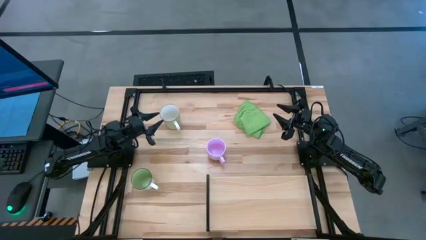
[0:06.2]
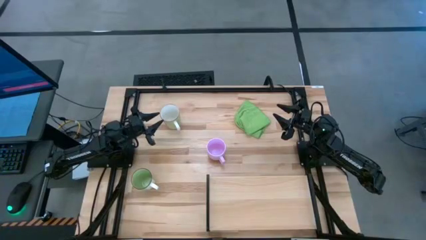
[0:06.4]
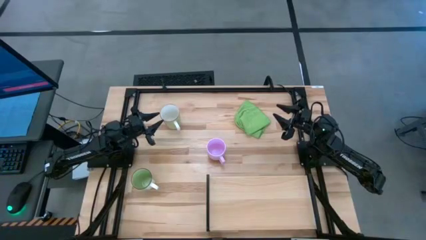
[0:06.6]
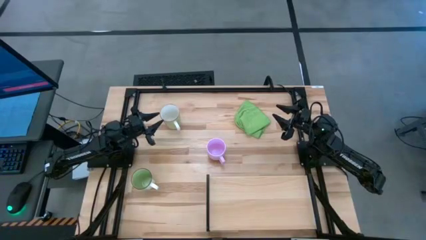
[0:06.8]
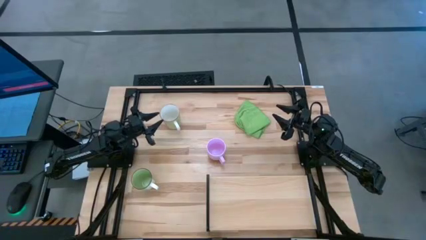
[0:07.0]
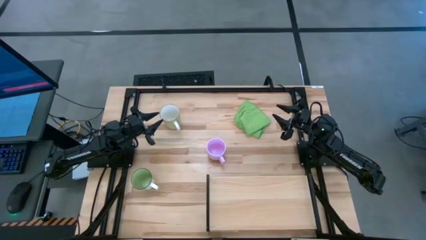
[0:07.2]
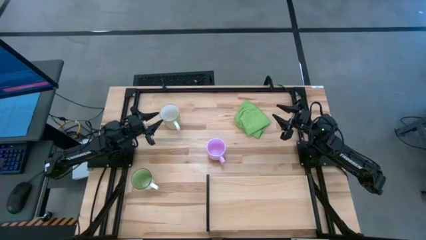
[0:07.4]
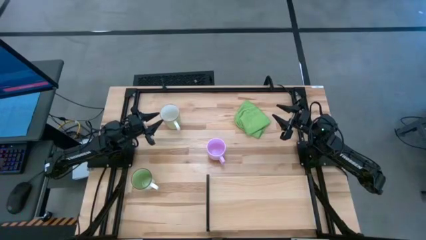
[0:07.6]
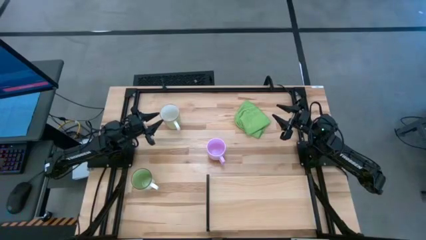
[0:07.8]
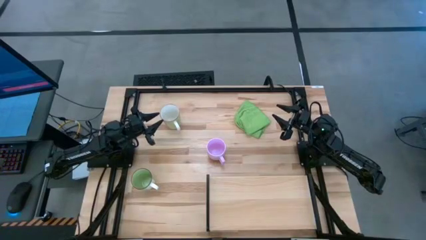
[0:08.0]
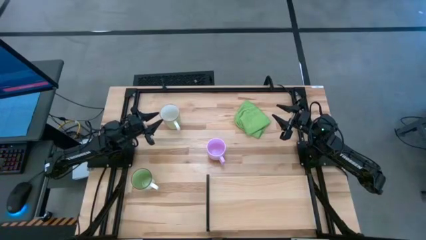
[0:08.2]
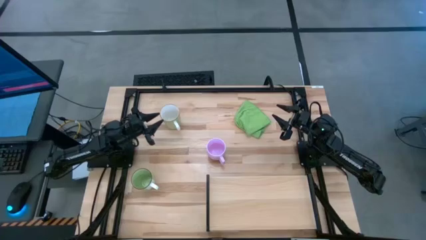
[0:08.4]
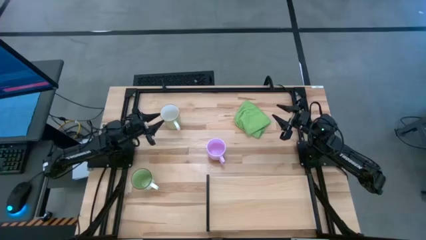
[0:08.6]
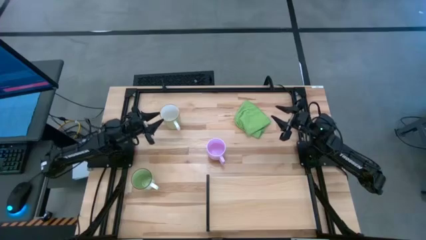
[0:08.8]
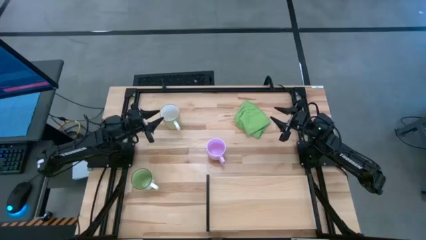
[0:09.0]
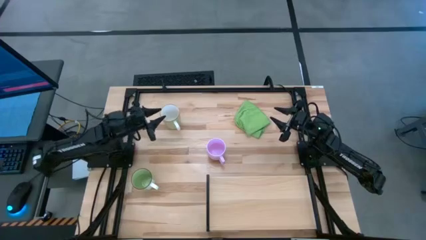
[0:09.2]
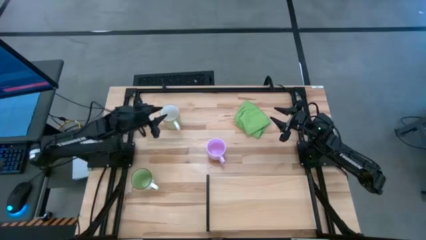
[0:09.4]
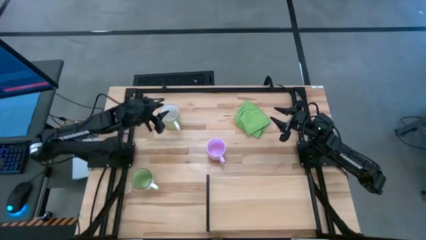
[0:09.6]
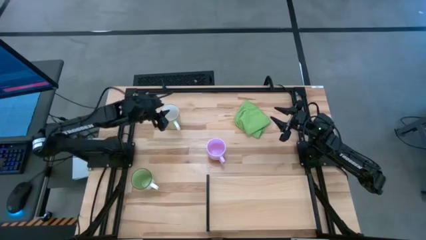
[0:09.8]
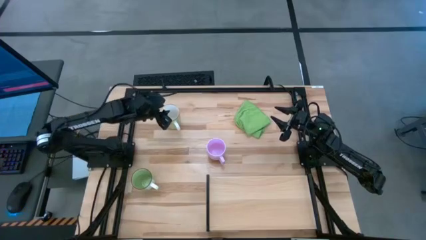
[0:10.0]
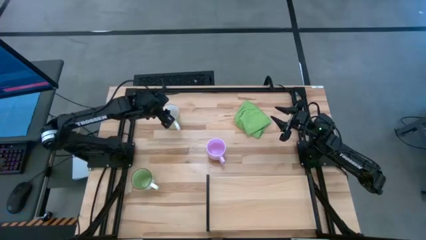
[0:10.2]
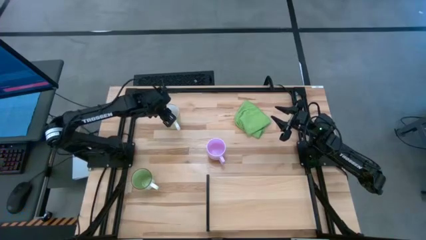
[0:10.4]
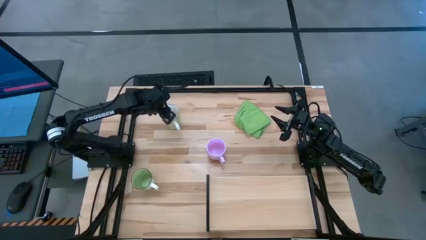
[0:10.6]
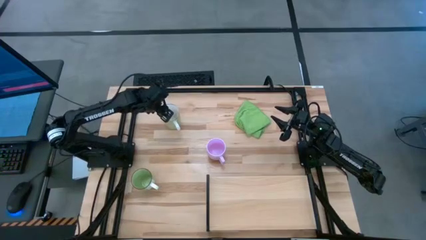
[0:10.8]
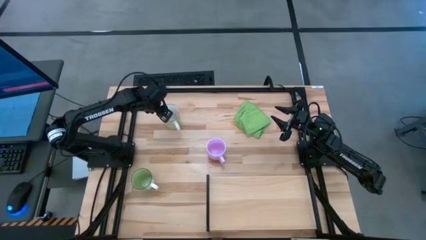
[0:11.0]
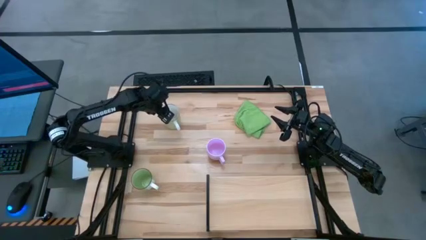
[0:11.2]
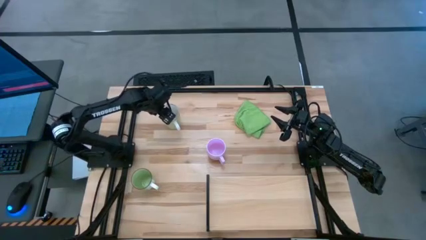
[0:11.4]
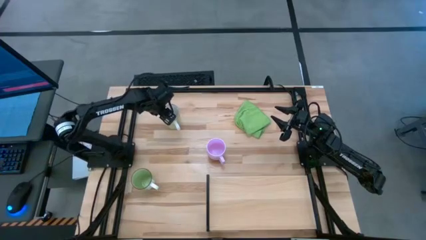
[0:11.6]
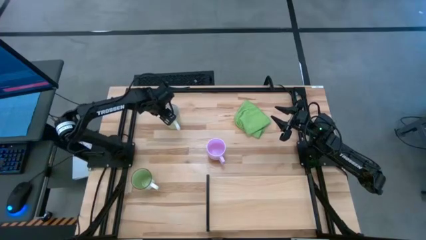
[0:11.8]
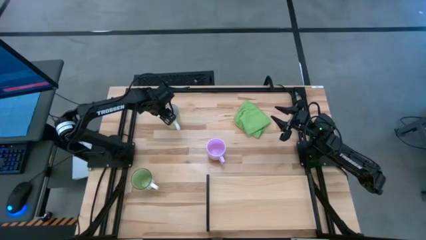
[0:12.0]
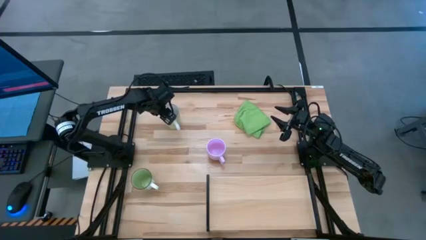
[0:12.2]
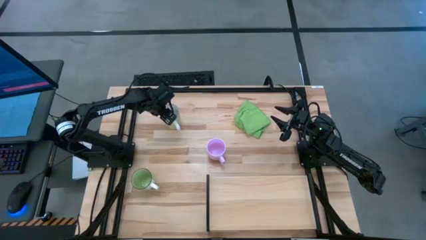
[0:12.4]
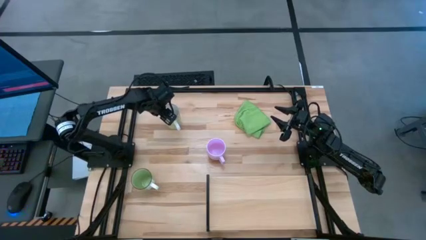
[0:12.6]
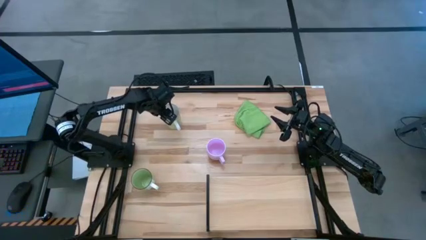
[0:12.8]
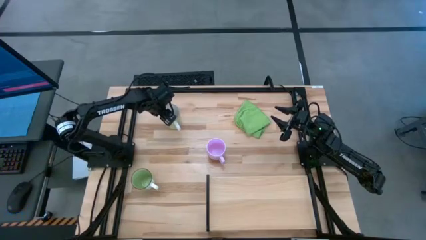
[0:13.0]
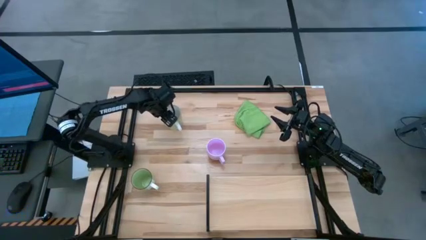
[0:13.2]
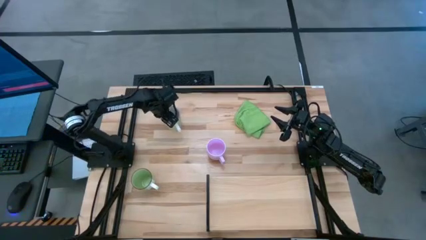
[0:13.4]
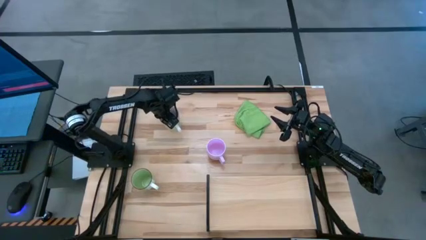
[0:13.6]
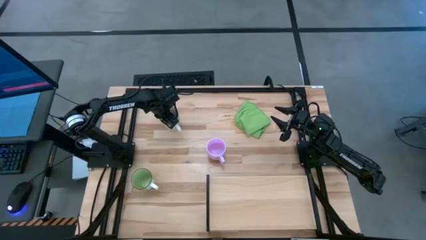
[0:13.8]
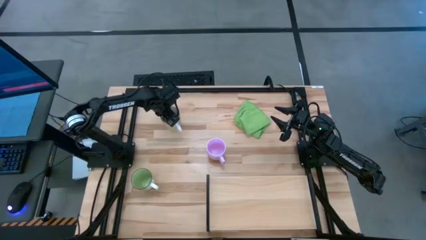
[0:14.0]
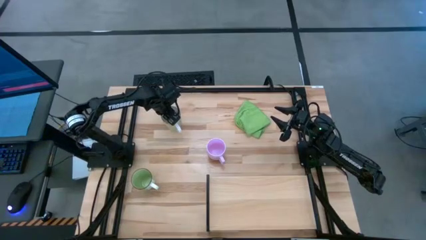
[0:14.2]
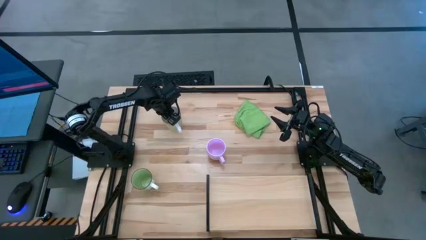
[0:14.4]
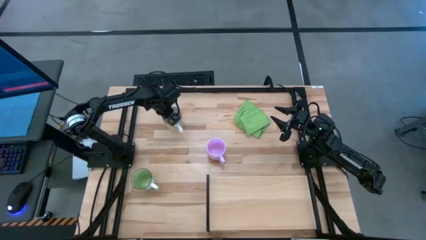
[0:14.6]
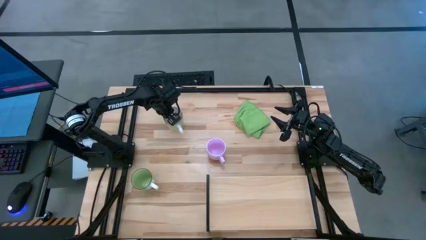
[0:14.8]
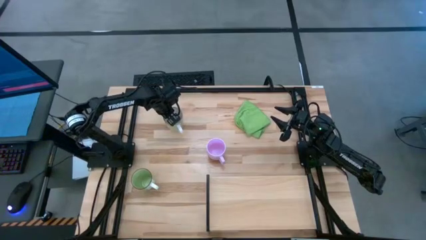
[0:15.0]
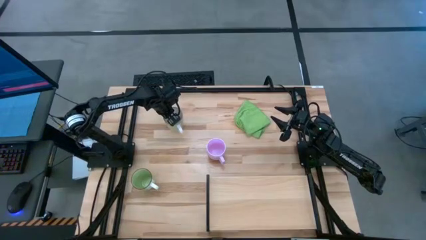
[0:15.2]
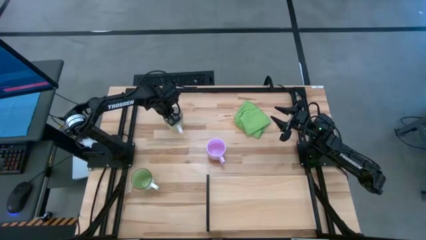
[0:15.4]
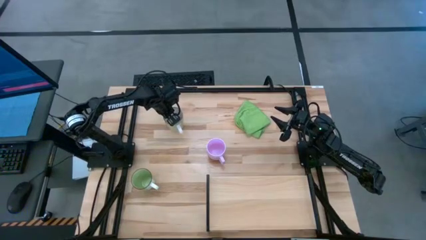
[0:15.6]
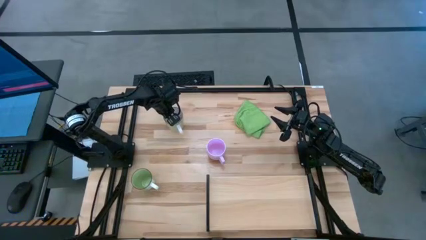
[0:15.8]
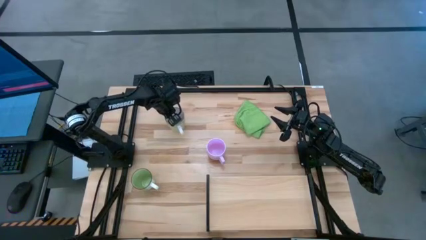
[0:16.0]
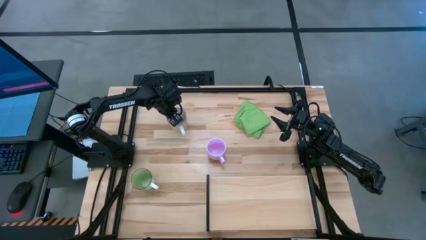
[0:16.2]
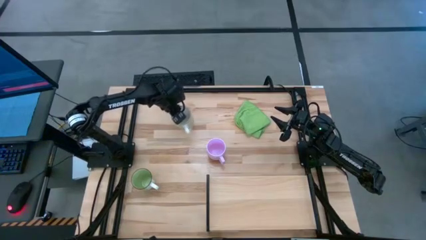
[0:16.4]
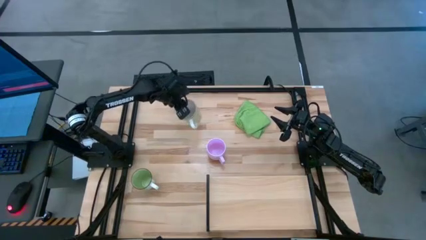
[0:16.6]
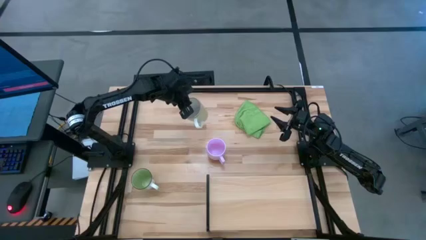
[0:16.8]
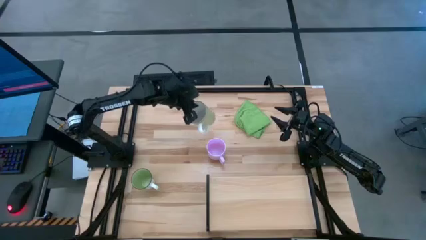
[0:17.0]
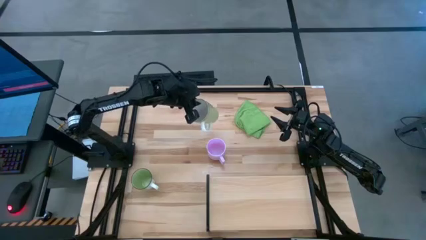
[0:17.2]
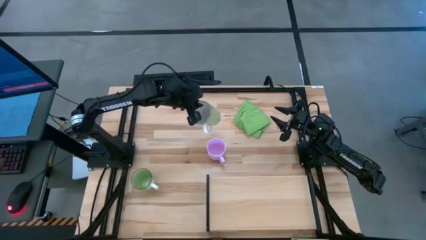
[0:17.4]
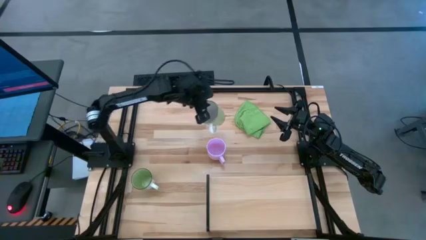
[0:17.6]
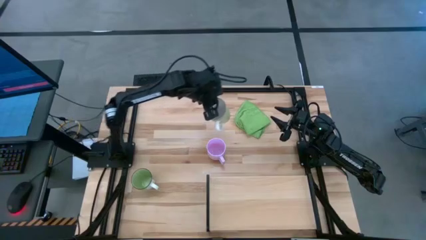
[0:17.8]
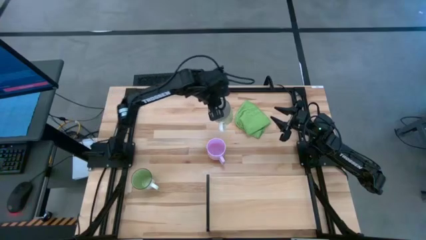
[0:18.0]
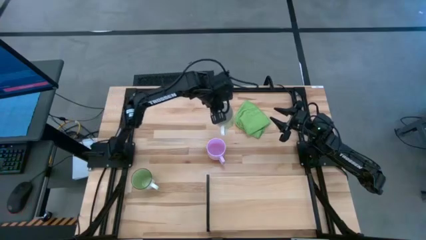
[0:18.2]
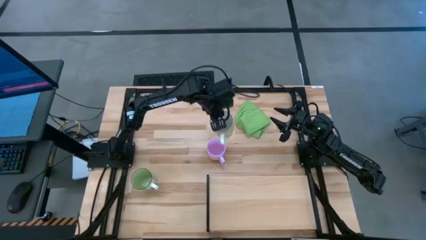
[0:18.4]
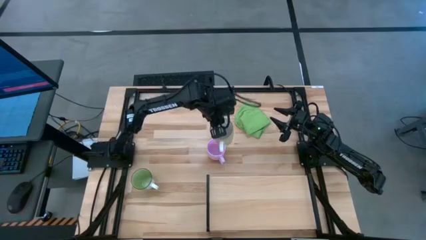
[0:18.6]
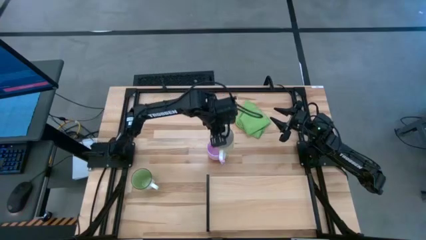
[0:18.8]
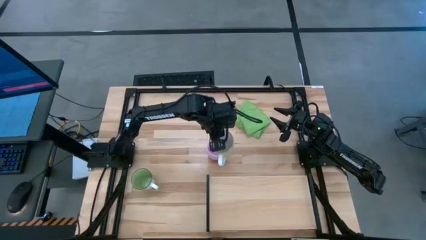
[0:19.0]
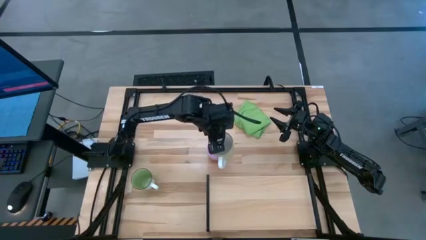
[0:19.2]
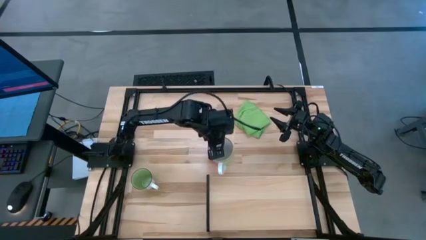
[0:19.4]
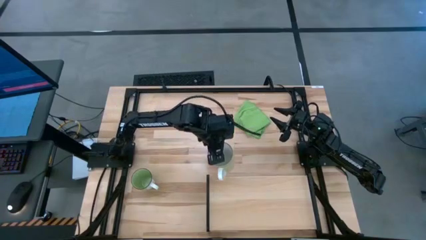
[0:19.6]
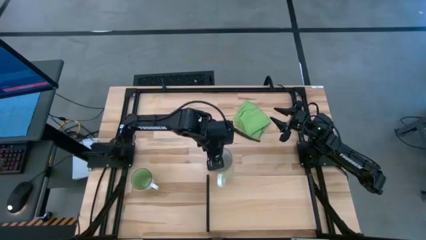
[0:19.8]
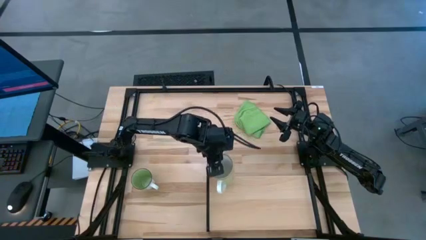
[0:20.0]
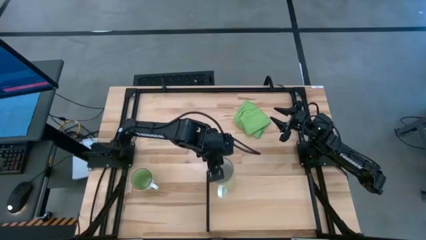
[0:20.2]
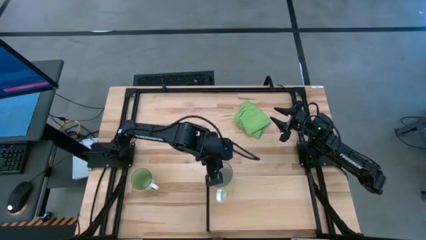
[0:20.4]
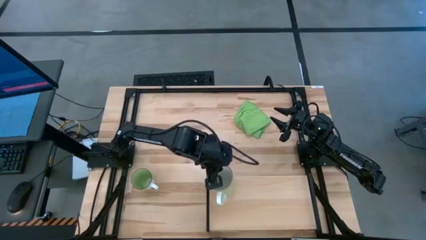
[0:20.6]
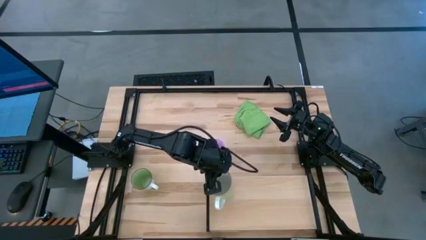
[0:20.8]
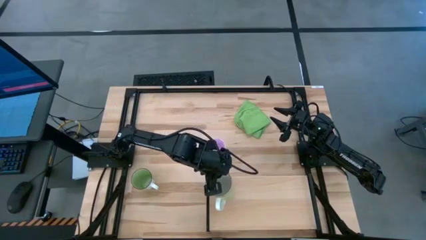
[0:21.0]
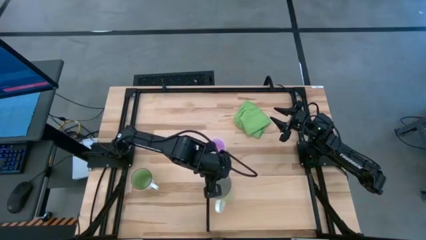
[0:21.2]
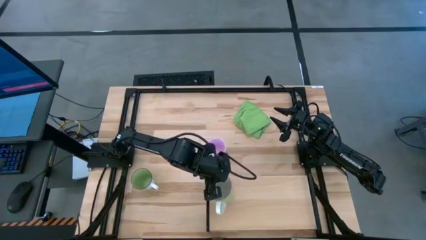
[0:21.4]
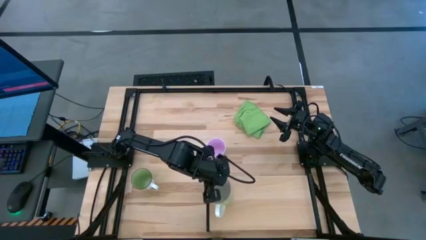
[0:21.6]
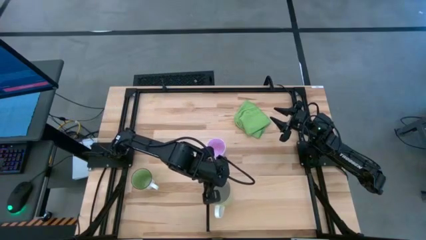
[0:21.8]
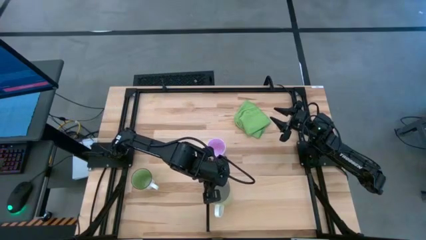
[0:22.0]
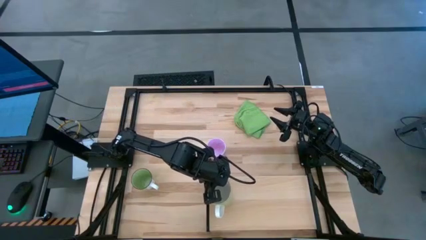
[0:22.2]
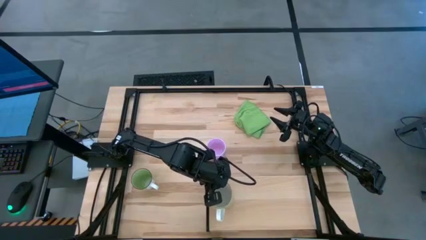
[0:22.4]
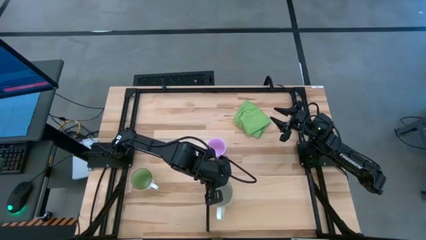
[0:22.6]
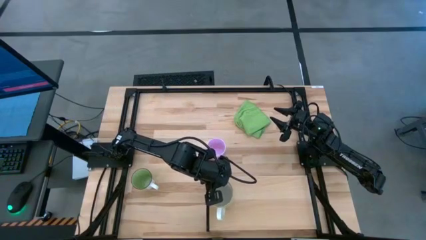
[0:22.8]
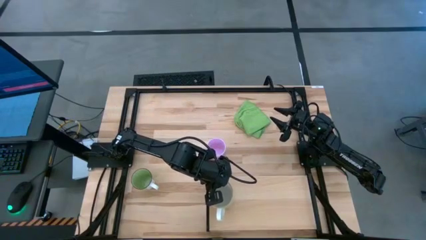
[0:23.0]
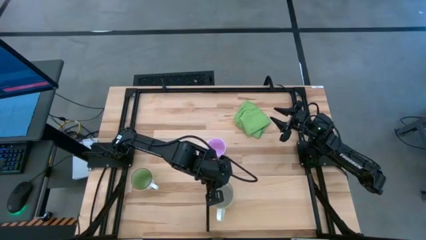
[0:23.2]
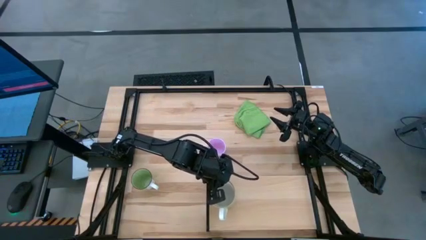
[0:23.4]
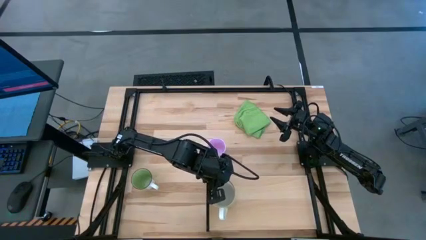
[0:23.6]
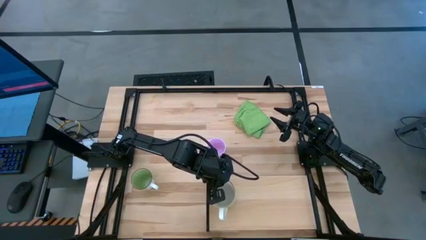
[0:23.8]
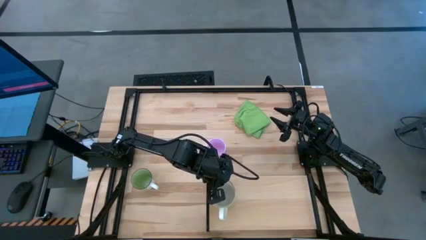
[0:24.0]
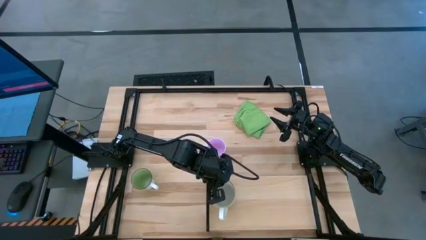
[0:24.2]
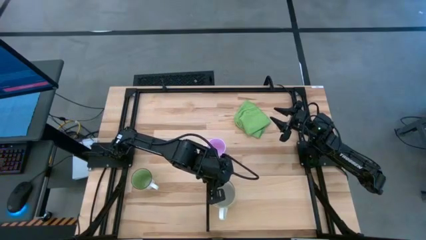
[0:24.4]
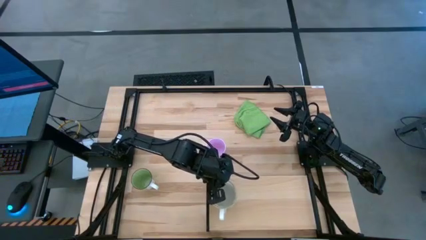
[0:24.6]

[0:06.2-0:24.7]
Task: Stack small to large cups/mugs on shelf
Put the light green mug on the shelf
